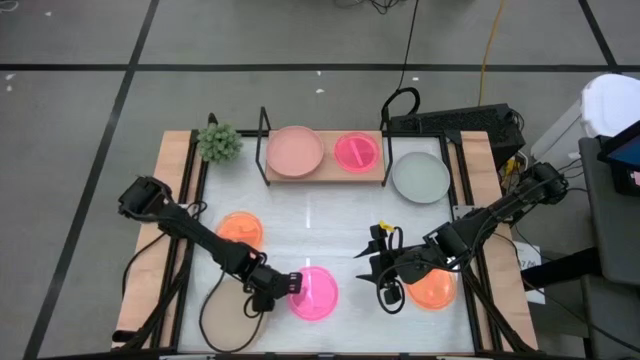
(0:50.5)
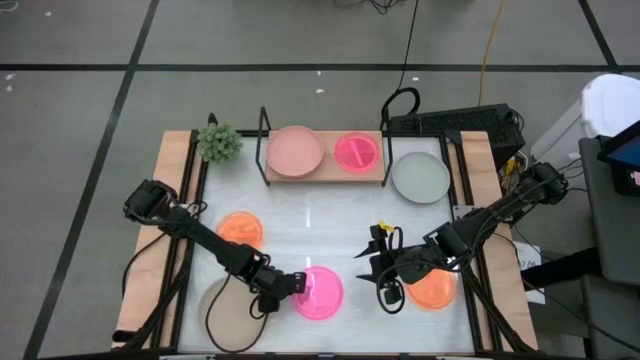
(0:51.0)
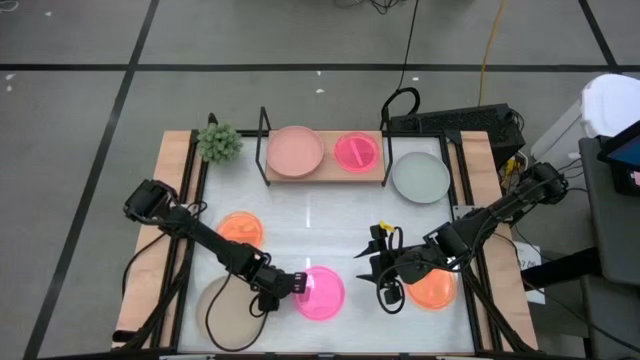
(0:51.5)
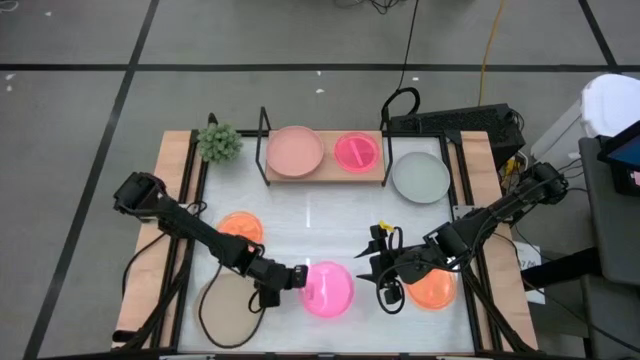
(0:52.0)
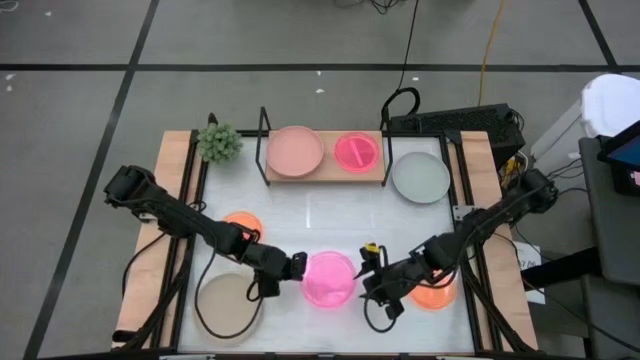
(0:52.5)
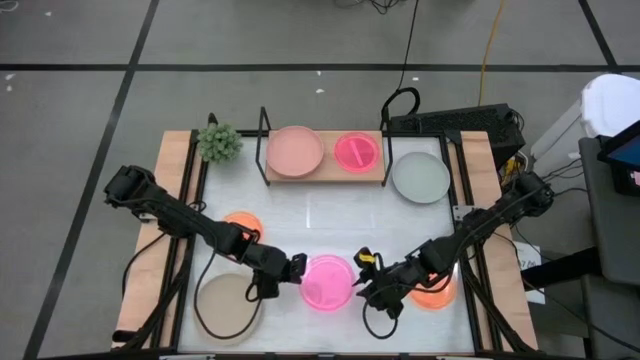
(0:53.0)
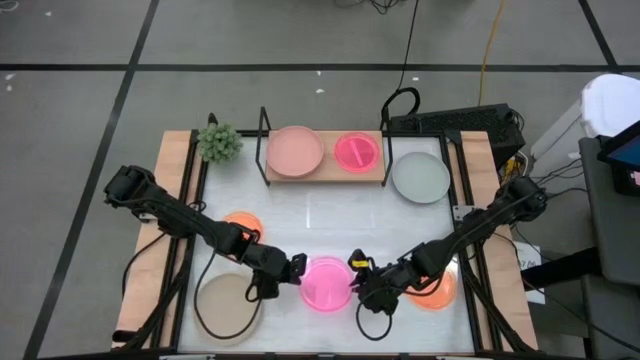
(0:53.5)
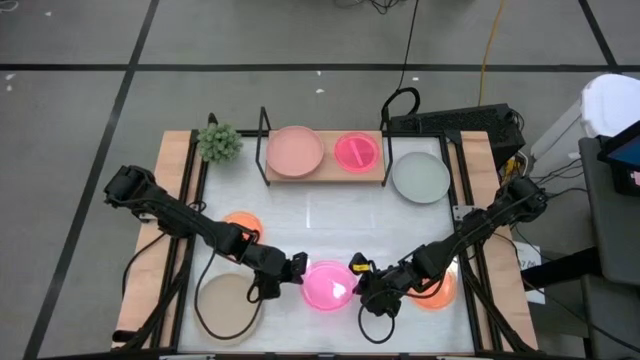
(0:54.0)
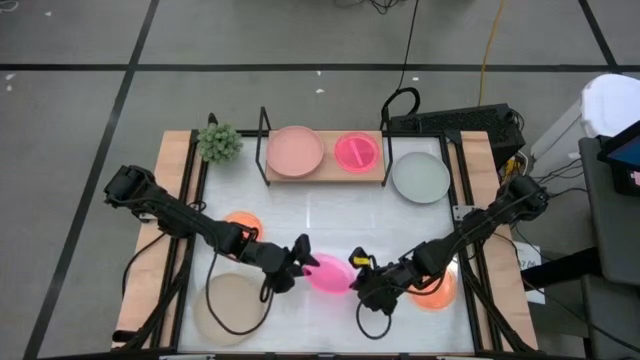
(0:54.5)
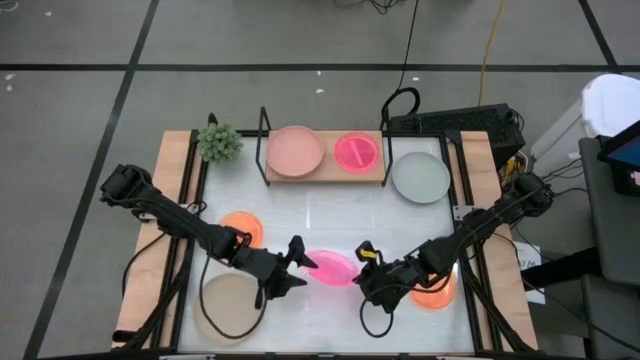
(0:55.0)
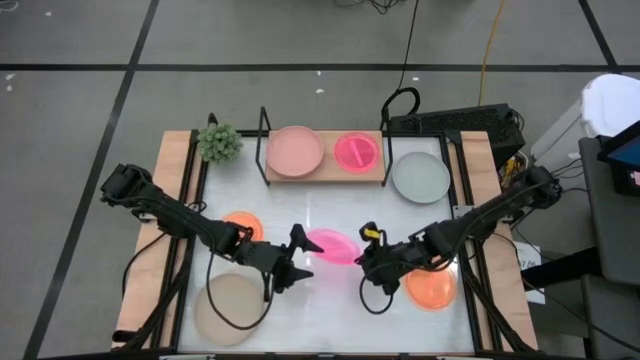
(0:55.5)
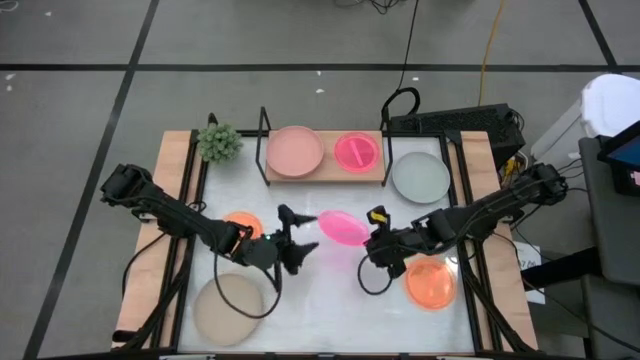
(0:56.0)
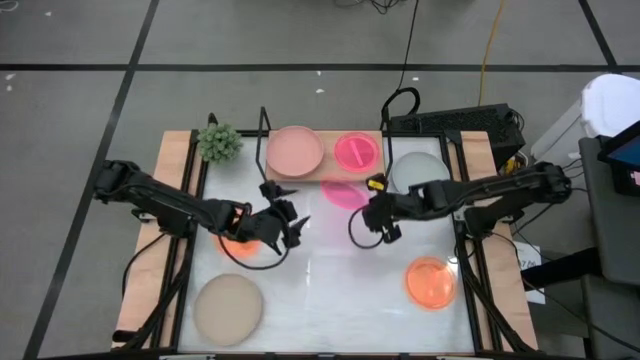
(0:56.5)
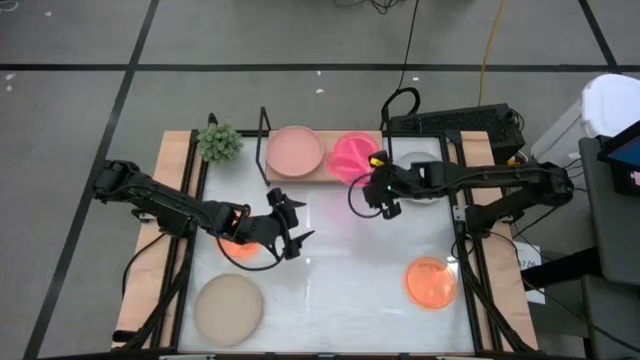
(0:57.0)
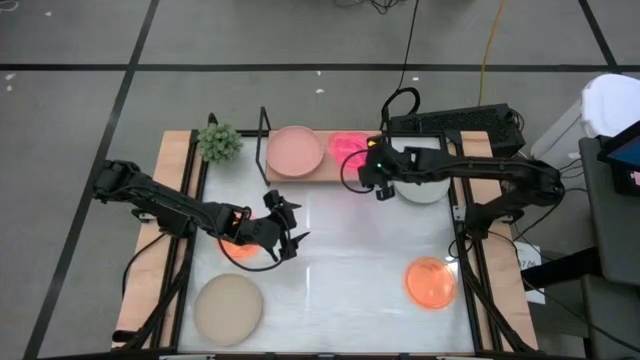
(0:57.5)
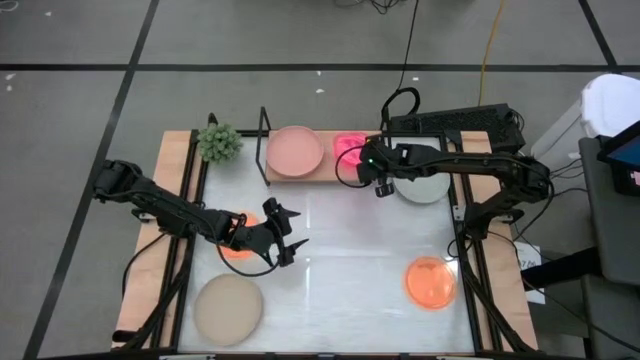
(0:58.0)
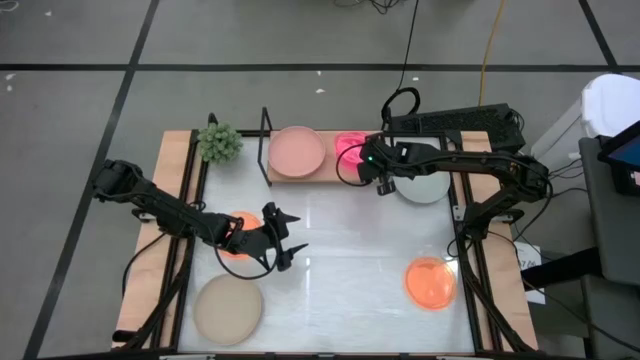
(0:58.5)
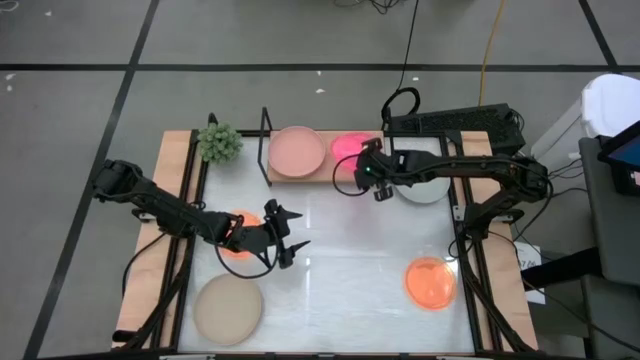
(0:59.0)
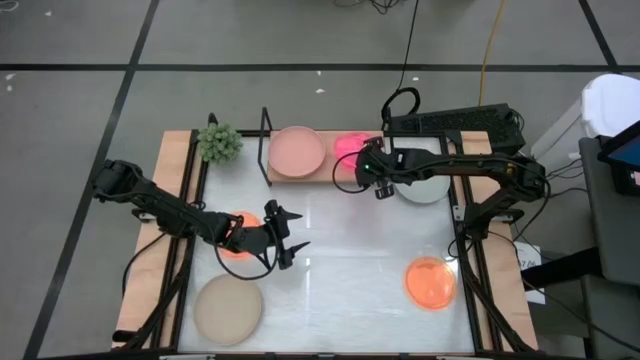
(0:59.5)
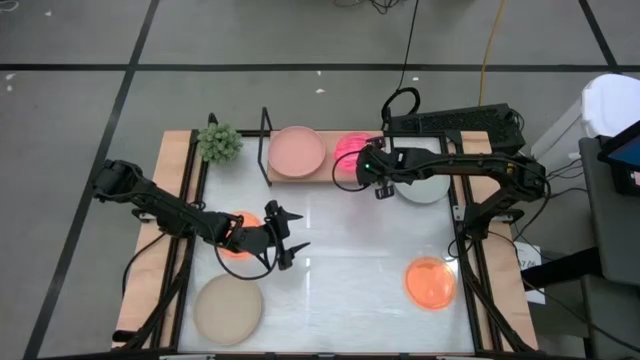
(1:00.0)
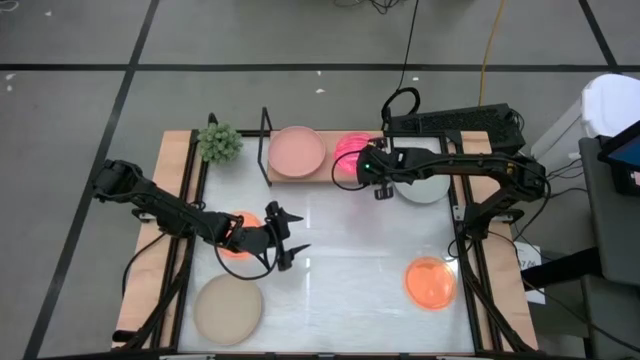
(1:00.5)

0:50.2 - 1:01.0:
Task: Place and stack plates onto a shelf
Stack the pink plate on the pink plate on the shelf

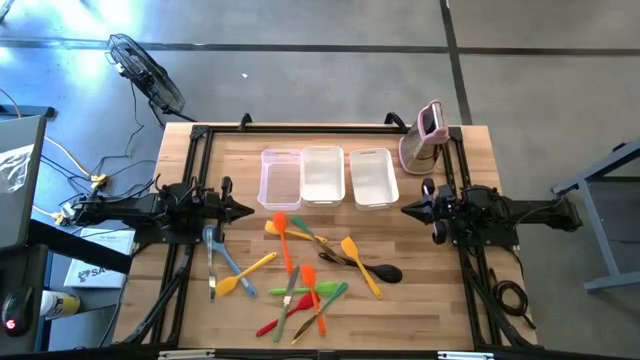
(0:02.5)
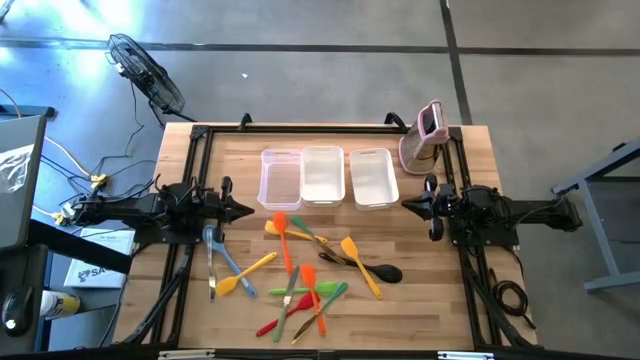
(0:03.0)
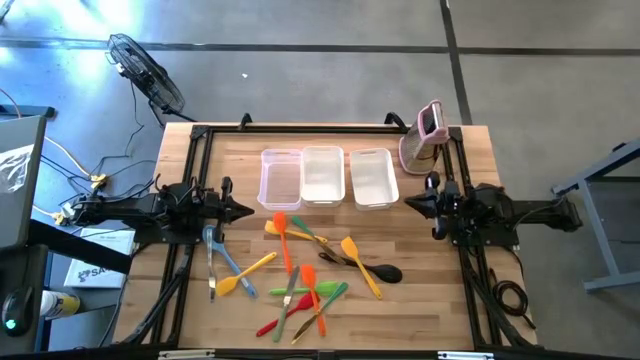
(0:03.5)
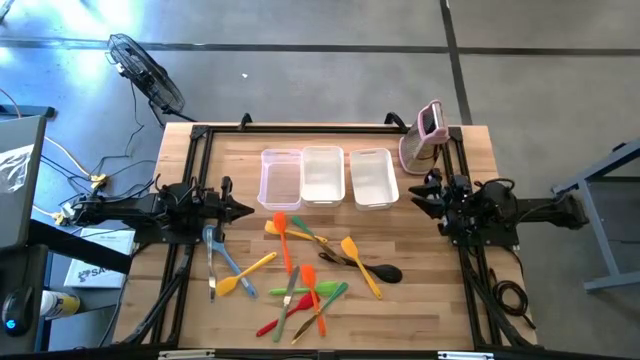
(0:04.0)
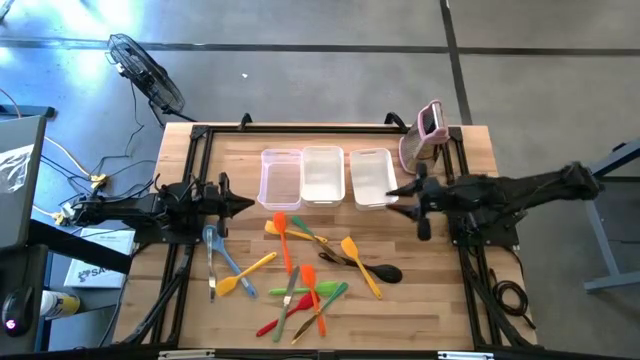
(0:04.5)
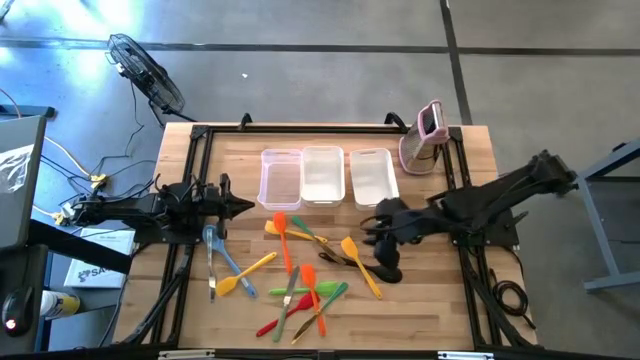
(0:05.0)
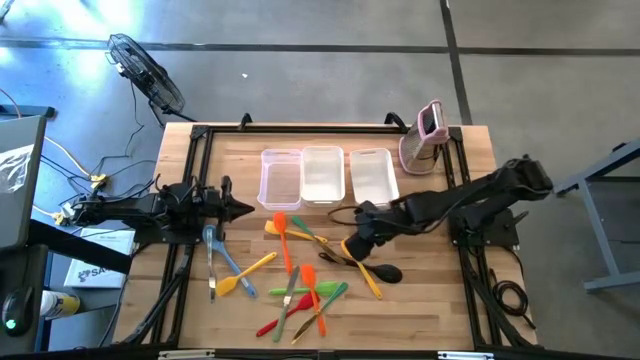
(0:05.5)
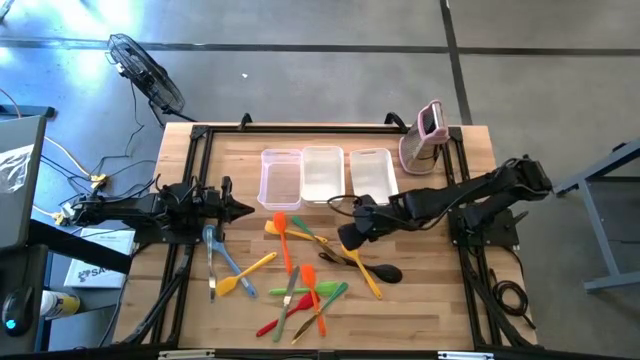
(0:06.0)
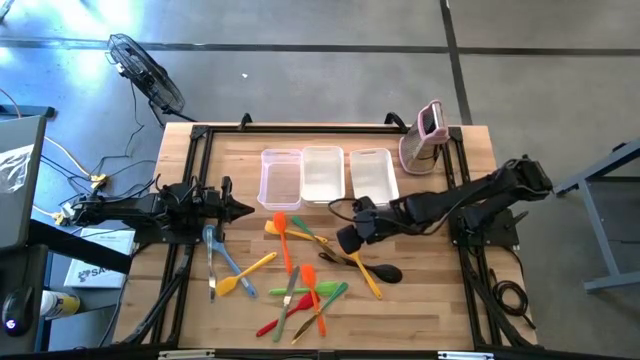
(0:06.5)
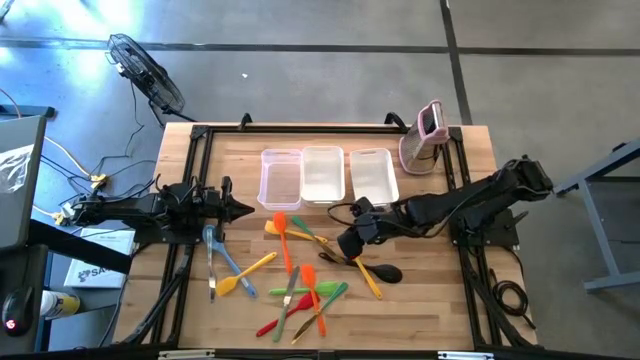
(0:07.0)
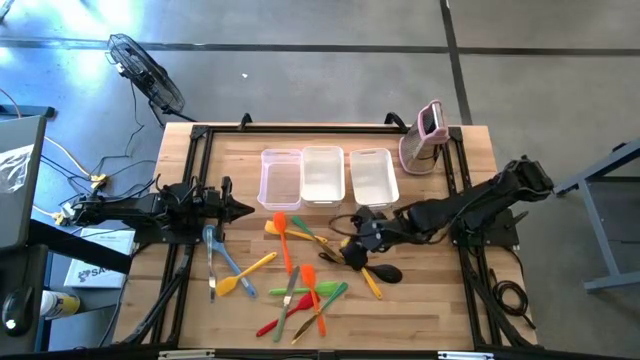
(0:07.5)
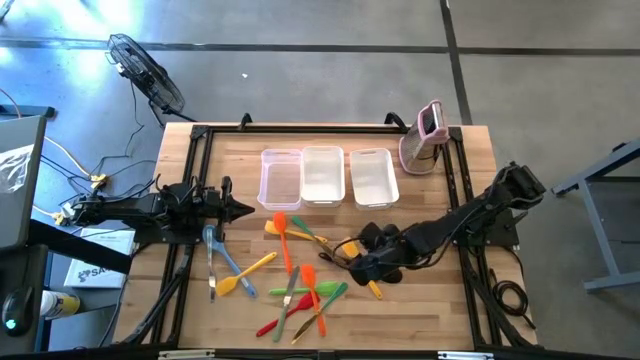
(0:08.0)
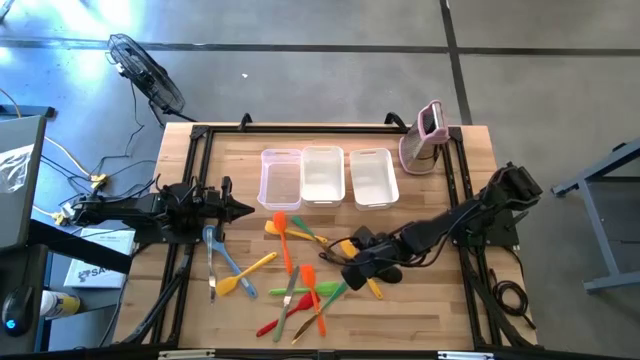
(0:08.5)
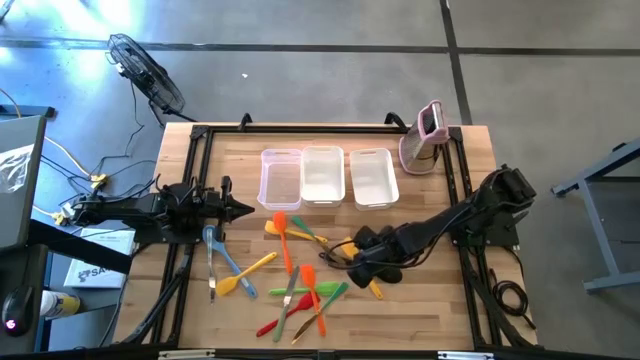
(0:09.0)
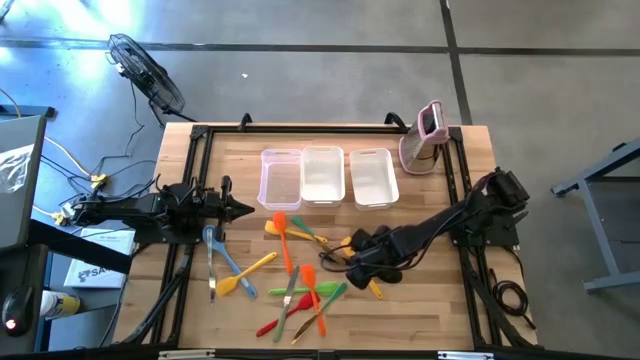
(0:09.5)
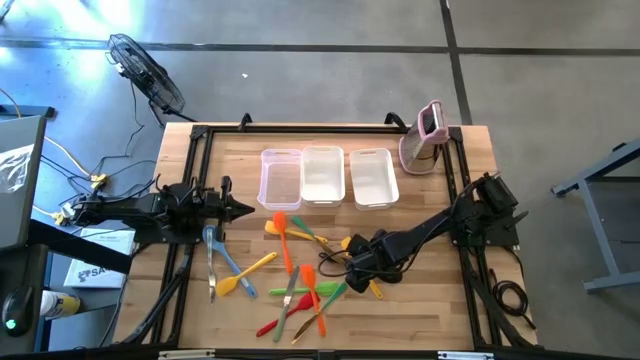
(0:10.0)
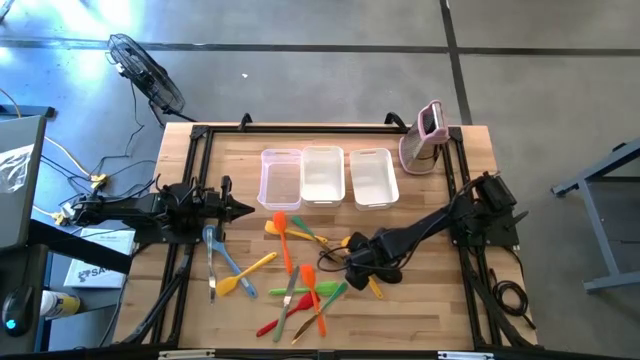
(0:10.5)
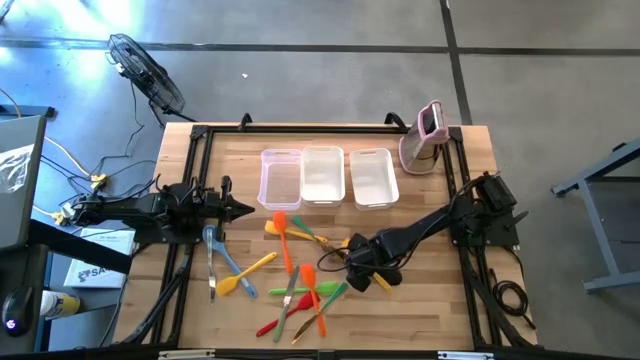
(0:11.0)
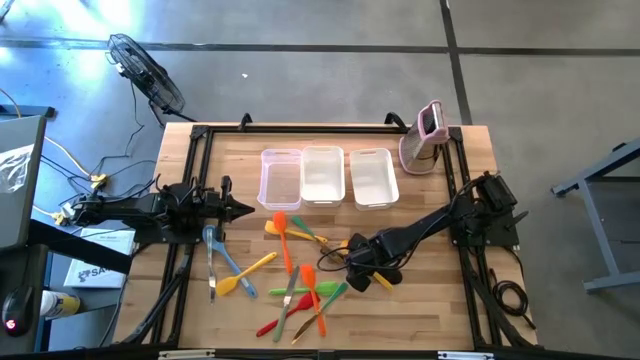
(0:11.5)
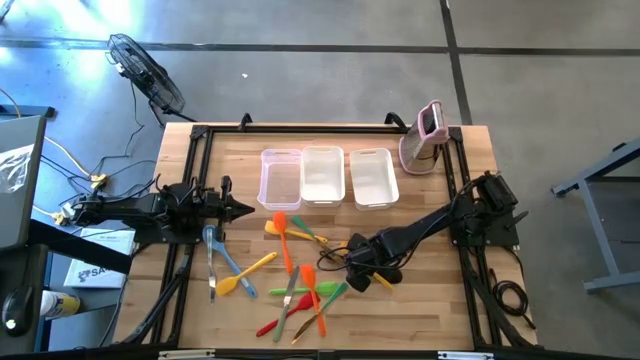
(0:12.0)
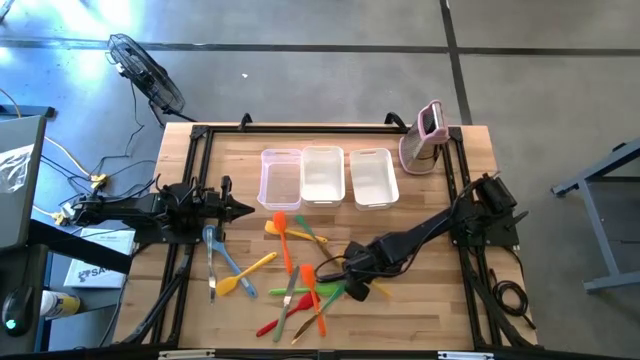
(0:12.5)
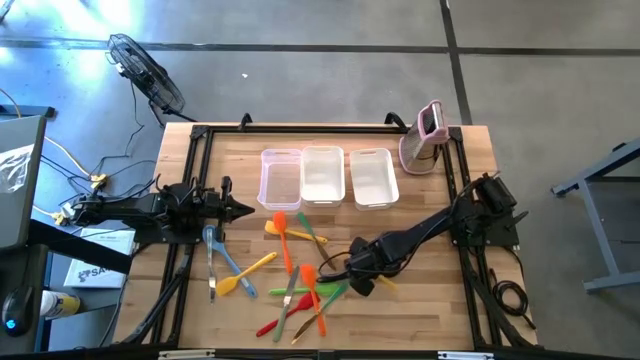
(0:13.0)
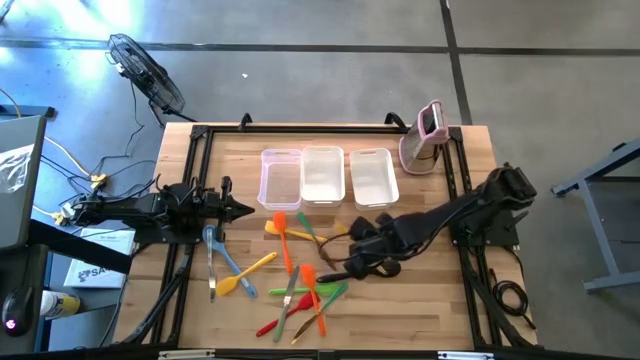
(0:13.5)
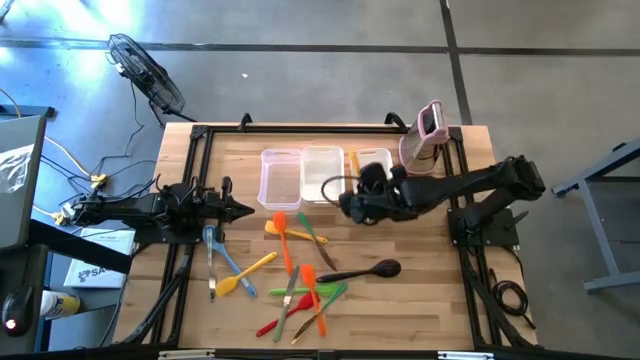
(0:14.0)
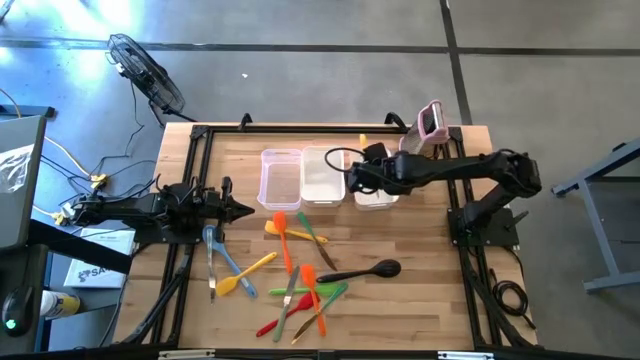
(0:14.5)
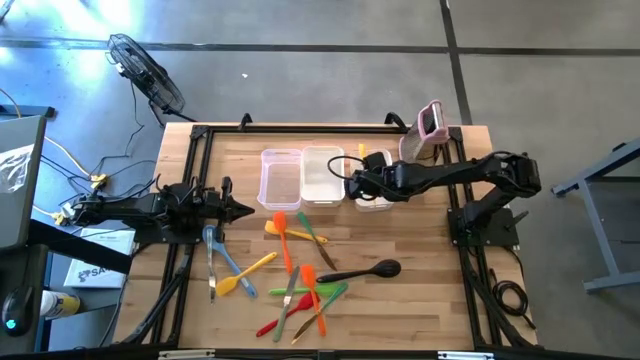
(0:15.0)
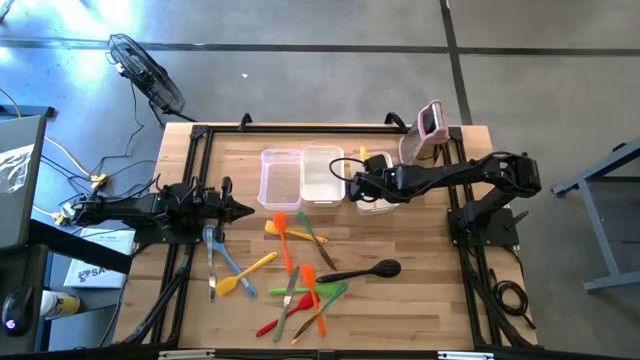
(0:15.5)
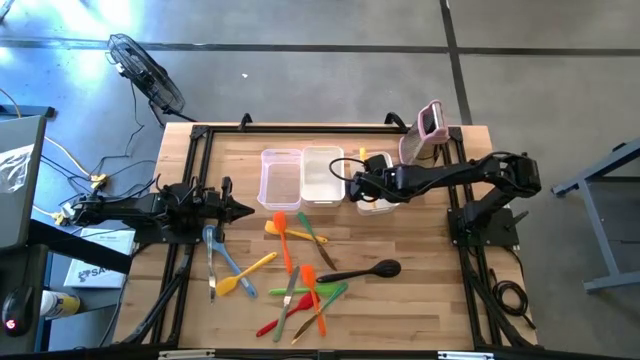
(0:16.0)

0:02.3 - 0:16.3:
Task: Pick & Place Kitchen Items
Put the bottom right yellow spatula into the right white bin
